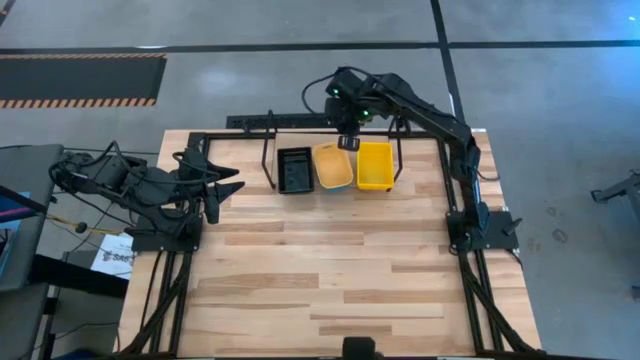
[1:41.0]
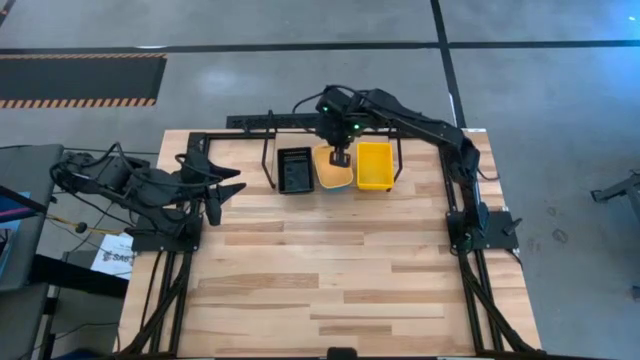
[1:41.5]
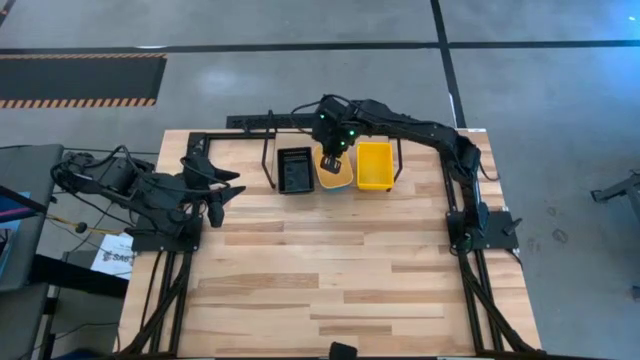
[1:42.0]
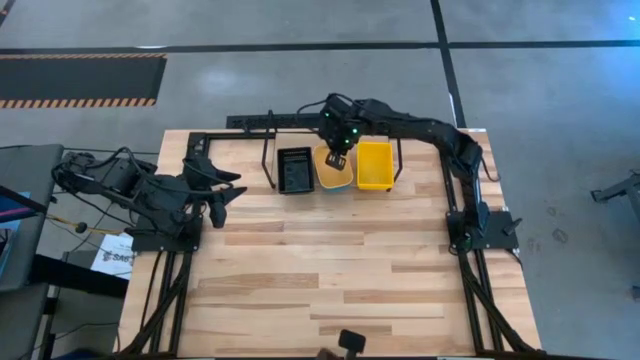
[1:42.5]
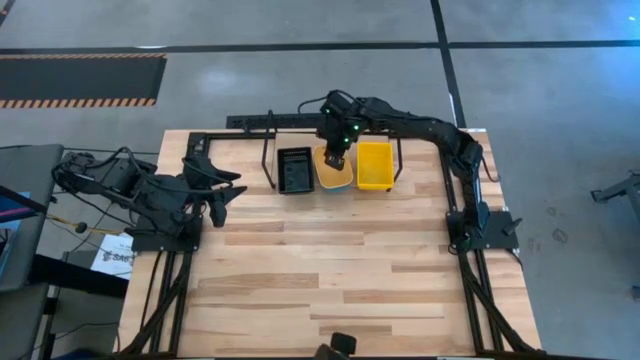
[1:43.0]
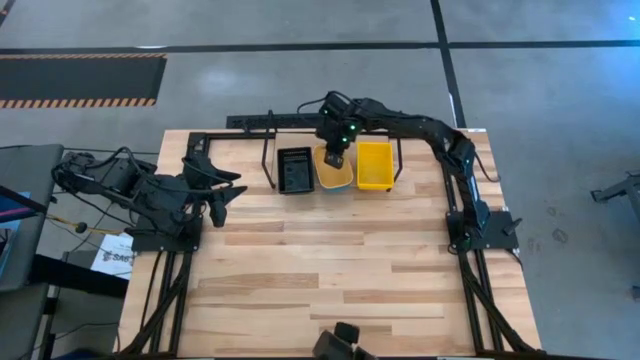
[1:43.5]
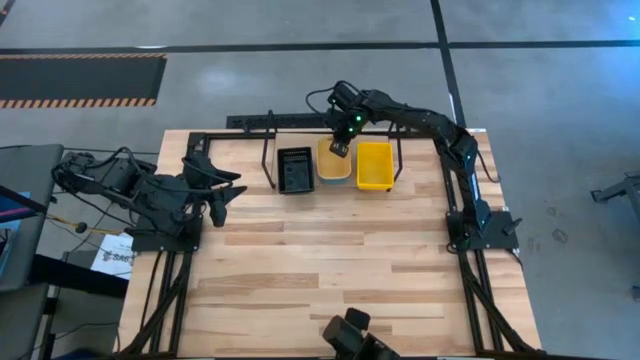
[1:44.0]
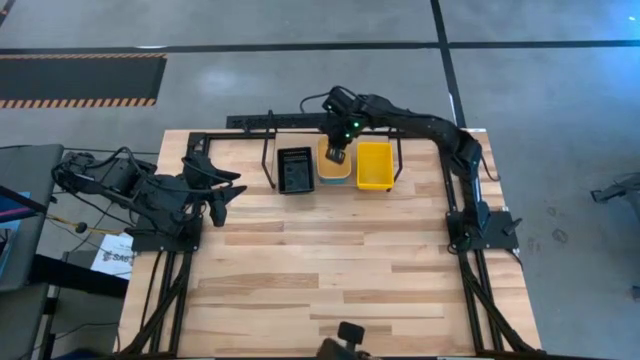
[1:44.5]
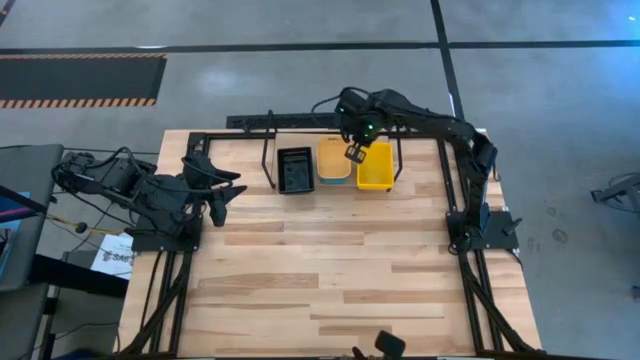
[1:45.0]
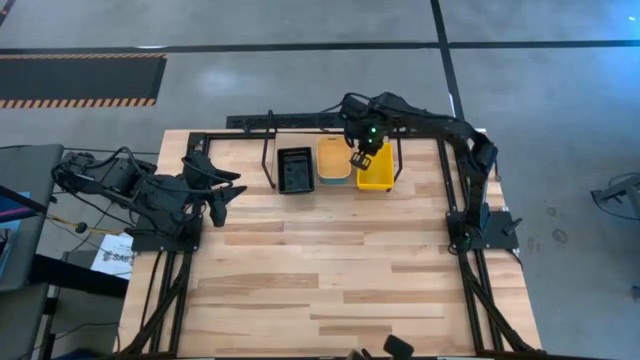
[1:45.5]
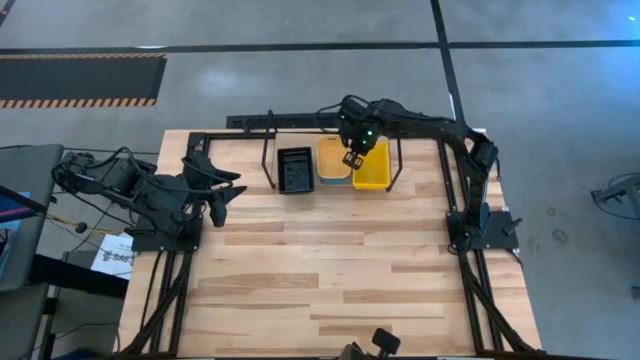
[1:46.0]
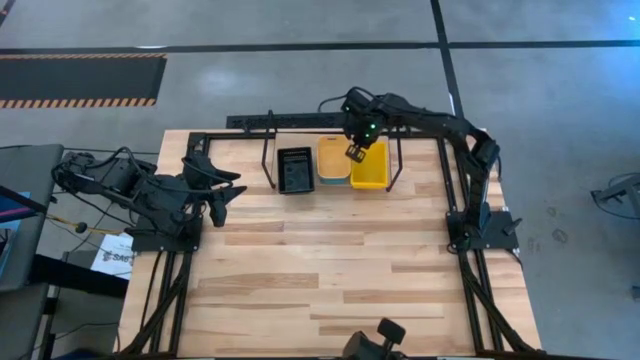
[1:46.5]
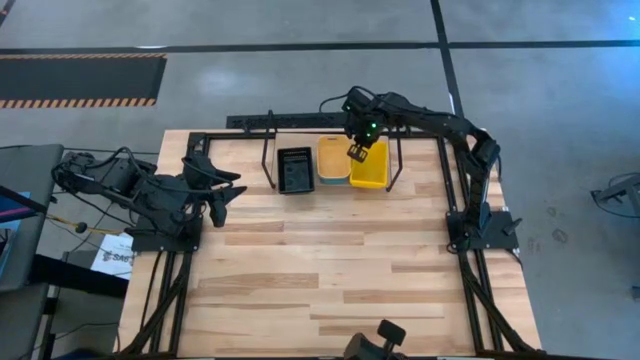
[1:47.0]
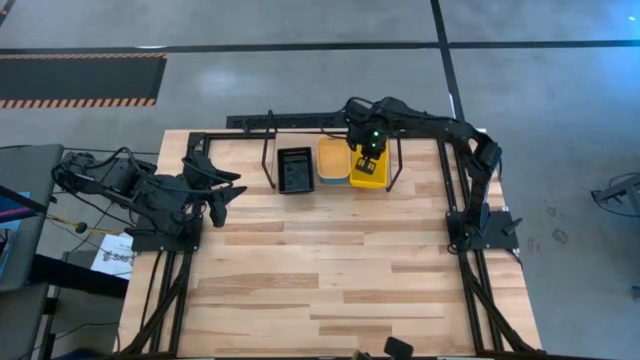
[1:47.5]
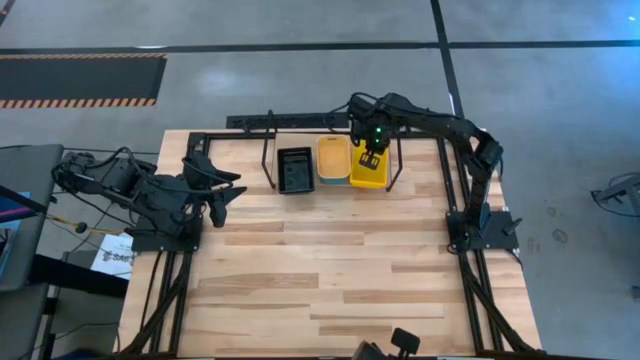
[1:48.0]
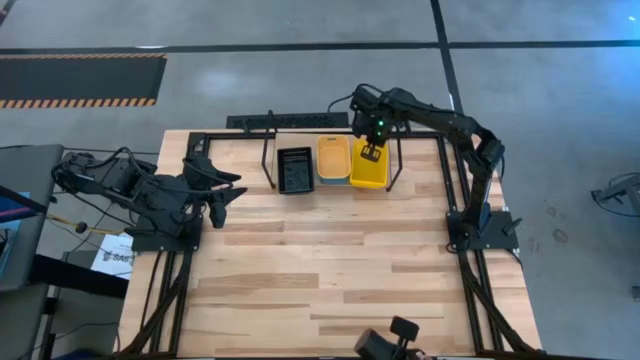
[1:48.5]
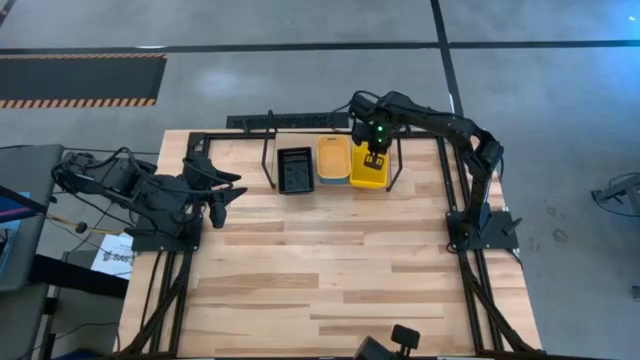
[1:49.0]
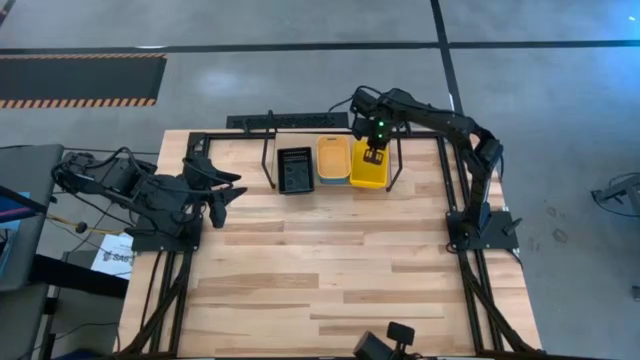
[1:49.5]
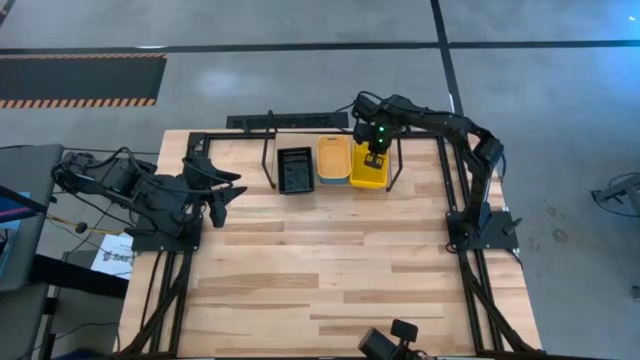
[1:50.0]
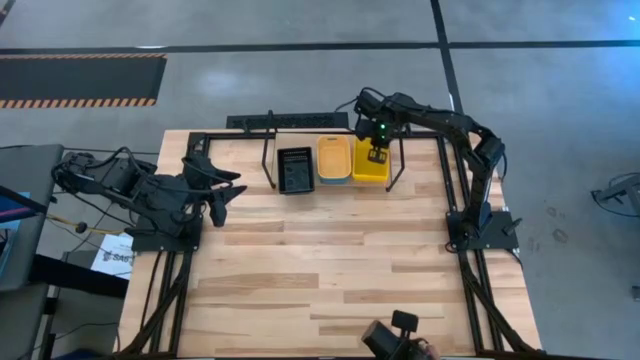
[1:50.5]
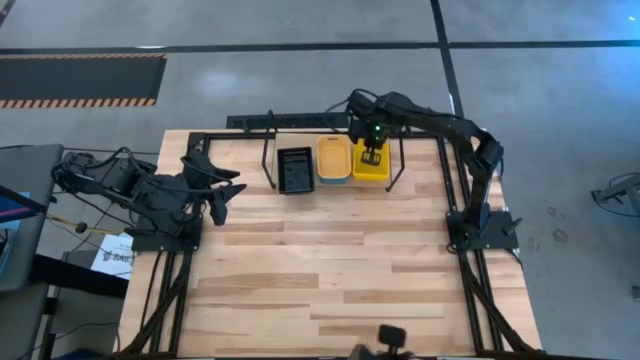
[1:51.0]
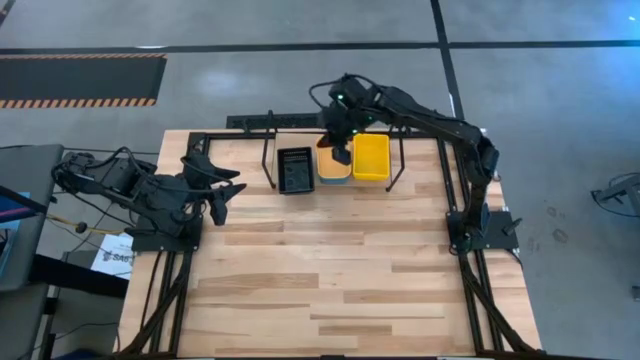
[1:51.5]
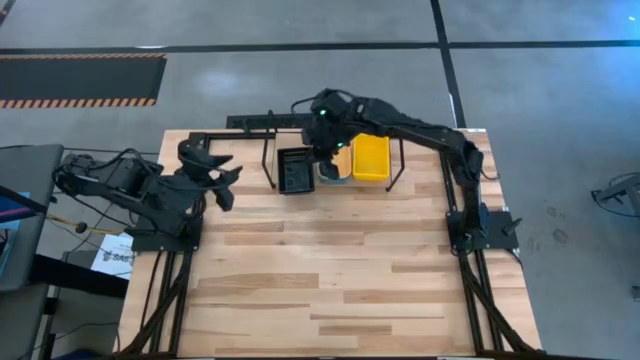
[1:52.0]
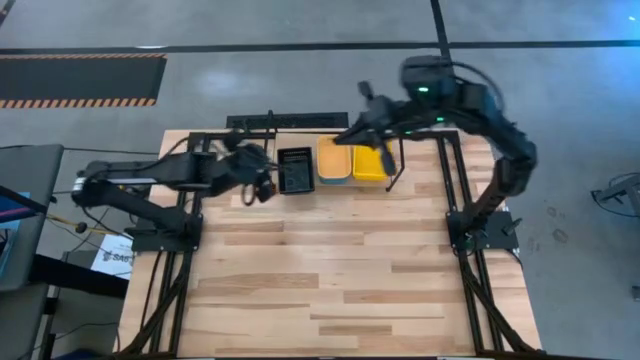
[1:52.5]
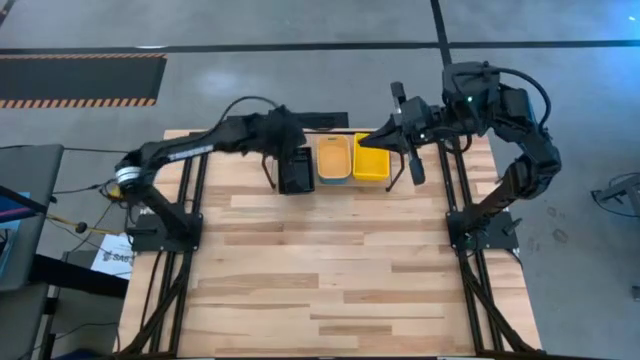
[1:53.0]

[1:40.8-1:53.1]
Task: Stack baskets on shelf by color
Adjust all bins on the shelf

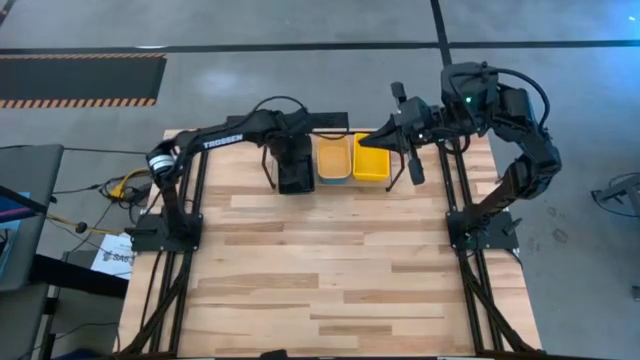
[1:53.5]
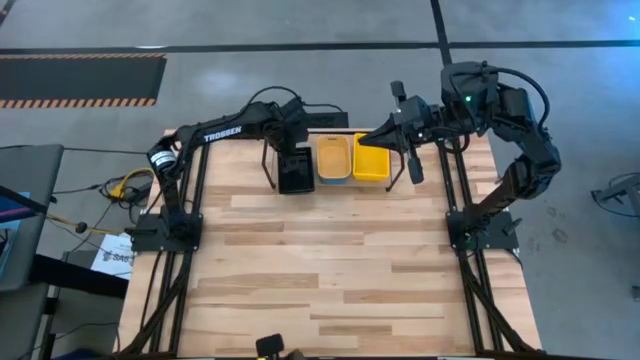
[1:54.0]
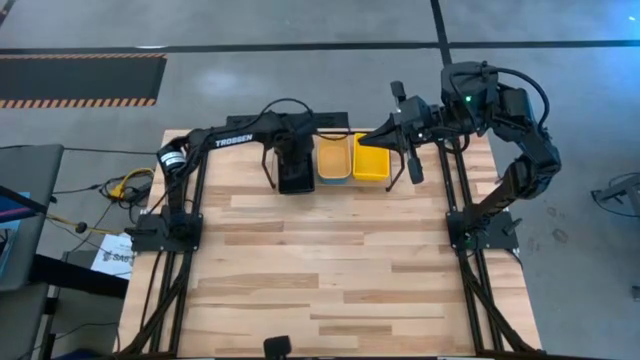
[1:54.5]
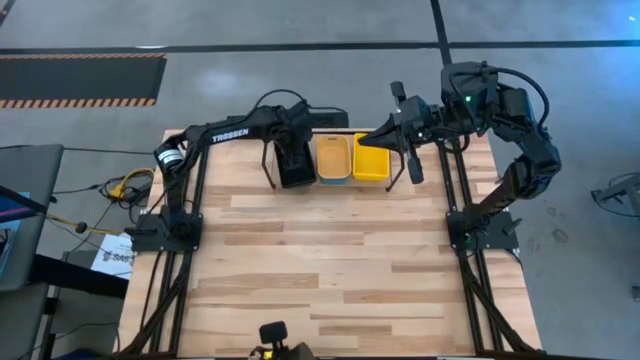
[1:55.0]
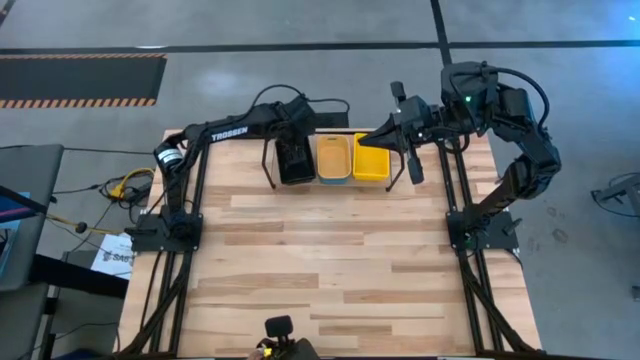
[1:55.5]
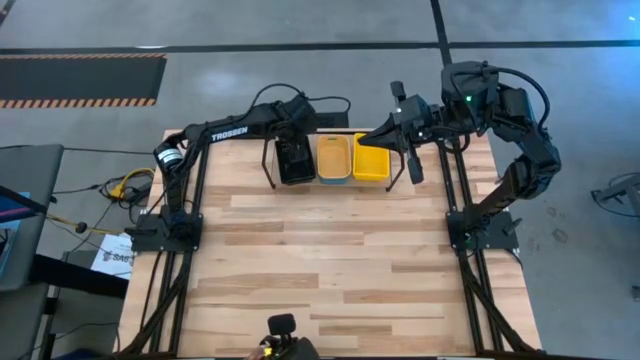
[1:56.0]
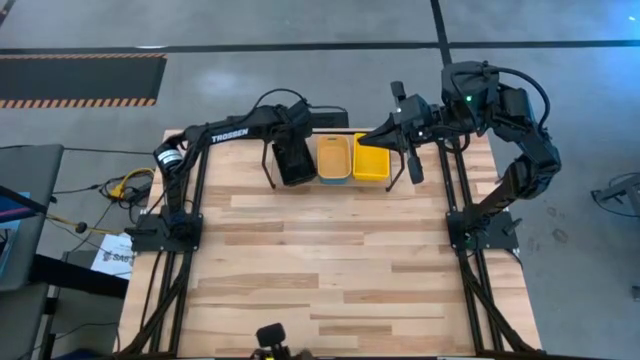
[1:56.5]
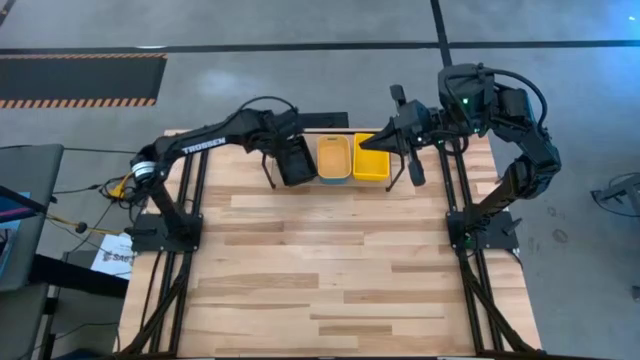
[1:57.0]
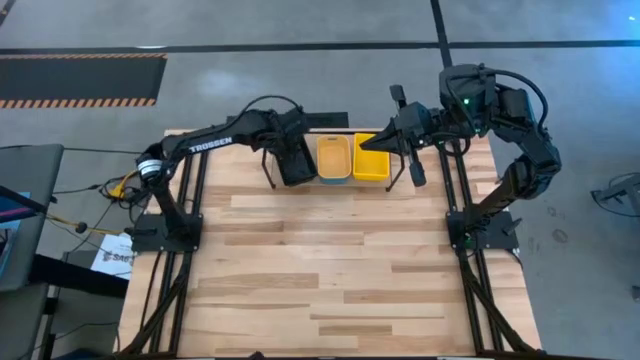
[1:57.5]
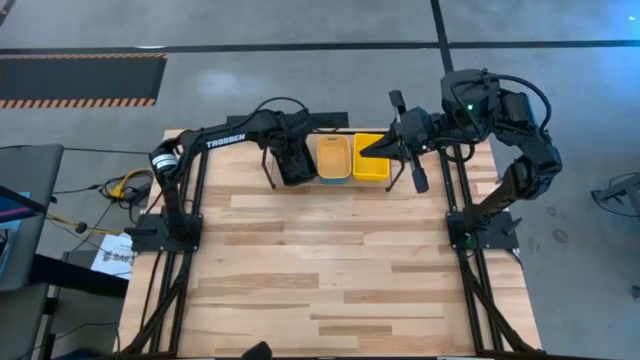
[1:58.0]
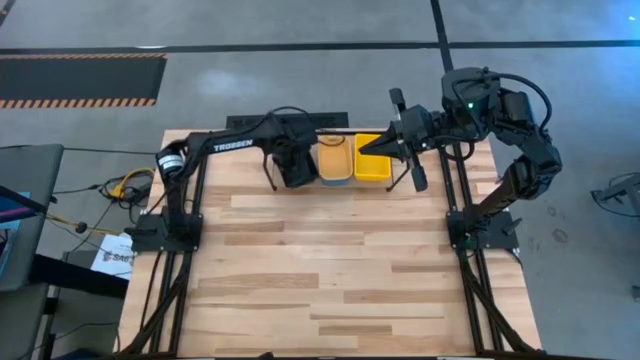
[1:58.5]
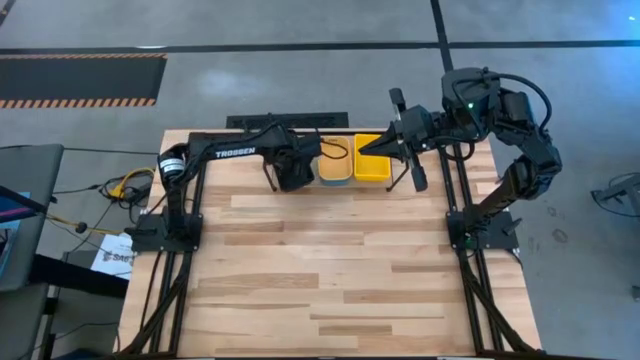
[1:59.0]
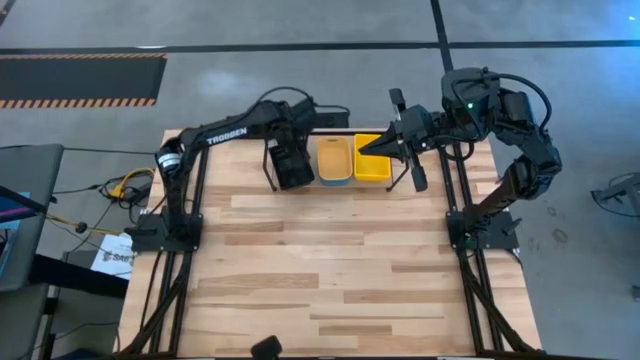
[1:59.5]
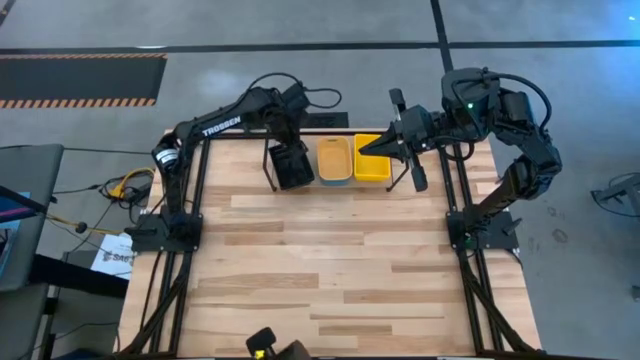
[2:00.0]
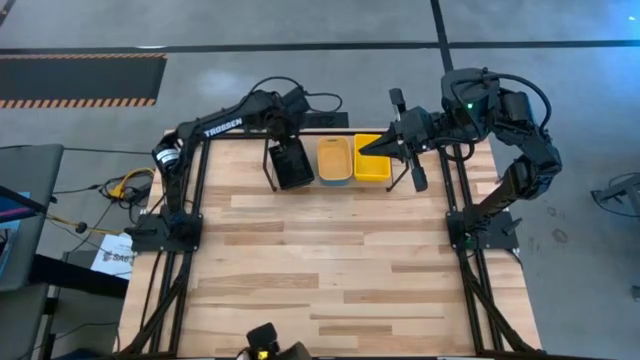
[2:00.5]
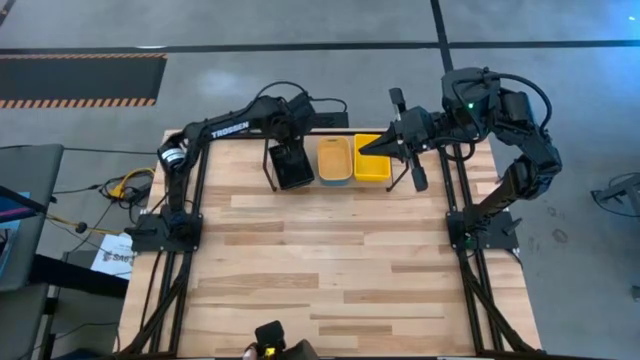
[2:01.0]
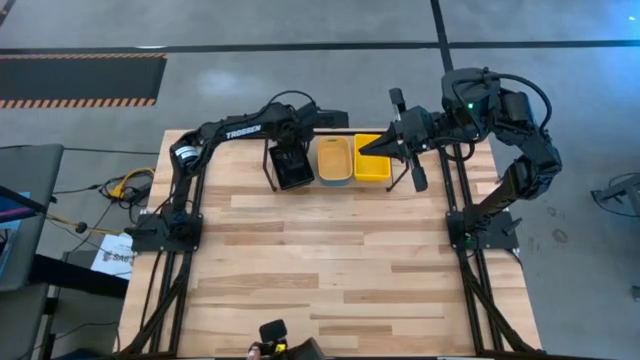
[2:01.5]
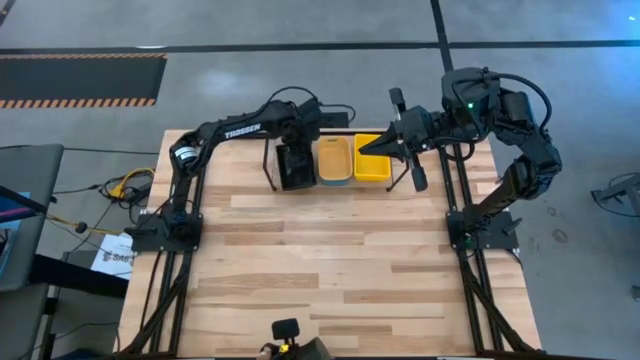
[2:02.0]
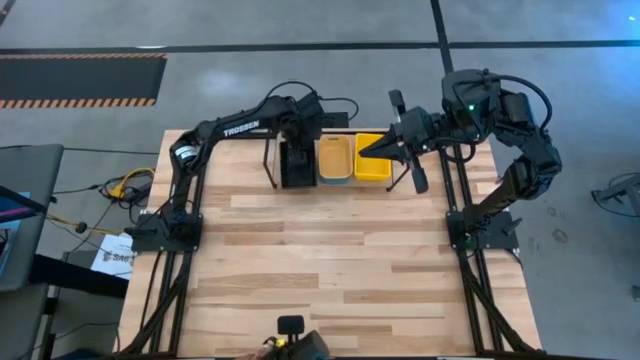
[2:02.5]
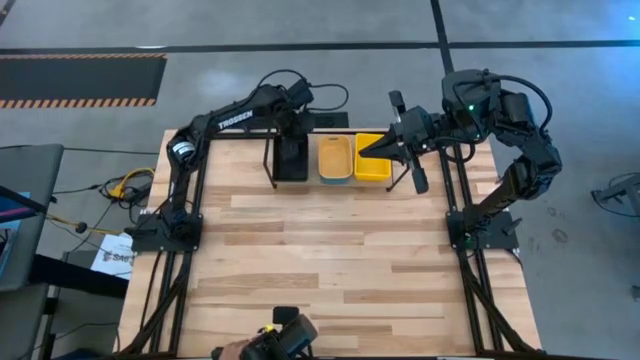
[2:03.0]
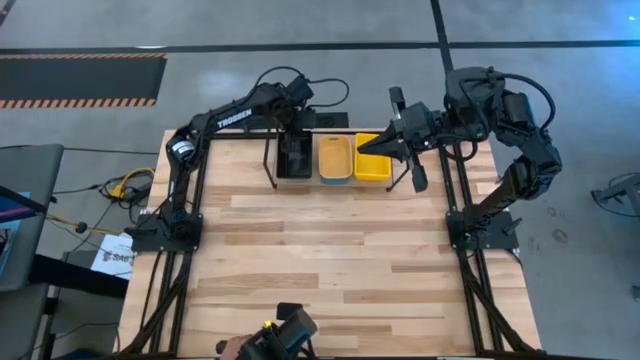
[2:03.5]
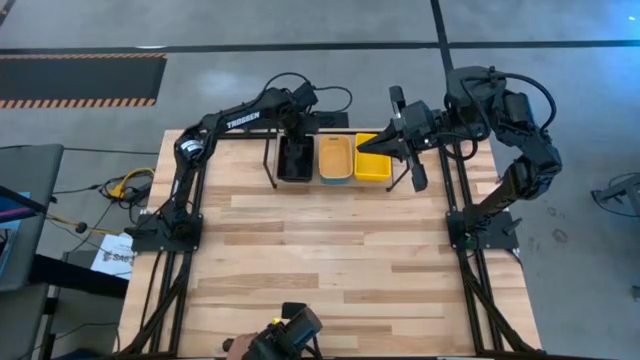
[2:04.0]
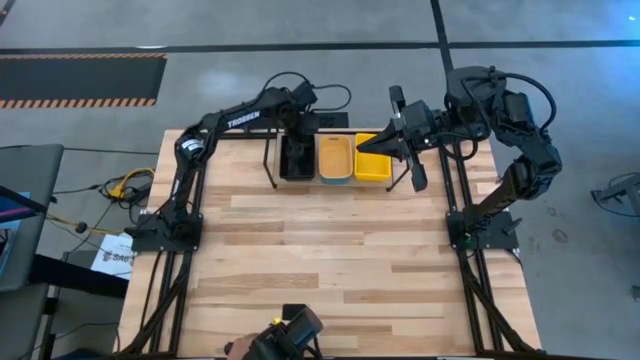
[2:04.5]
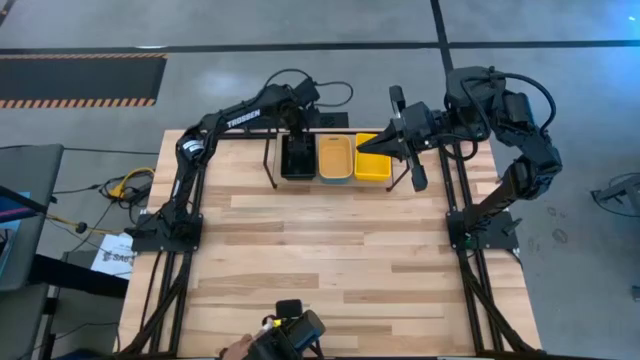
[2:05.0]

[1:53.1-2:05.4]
Adjust all bins on the shelf
